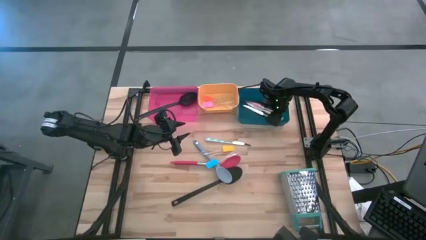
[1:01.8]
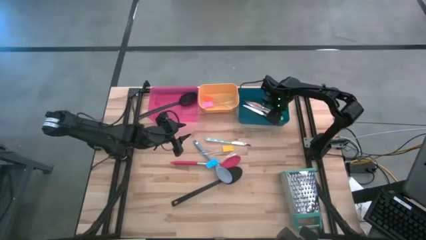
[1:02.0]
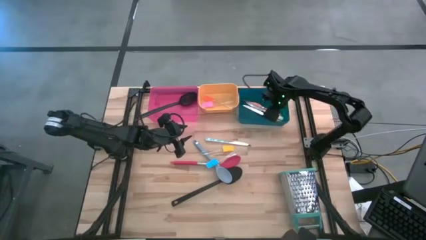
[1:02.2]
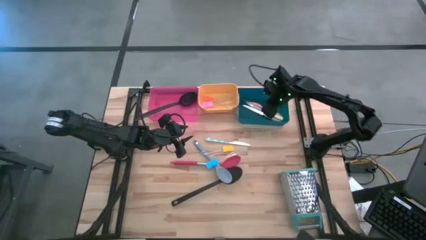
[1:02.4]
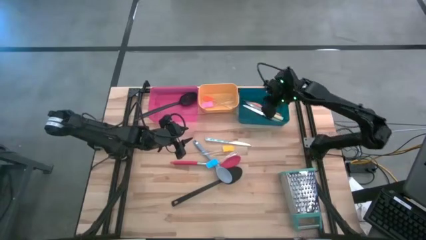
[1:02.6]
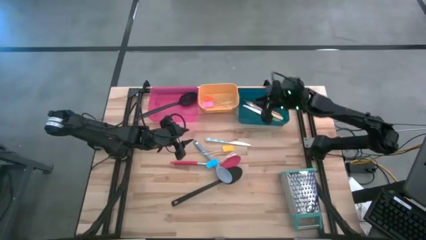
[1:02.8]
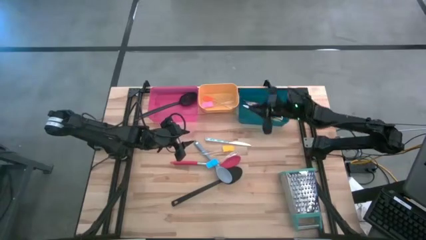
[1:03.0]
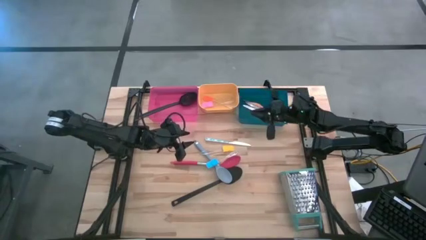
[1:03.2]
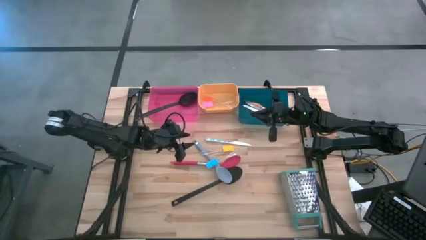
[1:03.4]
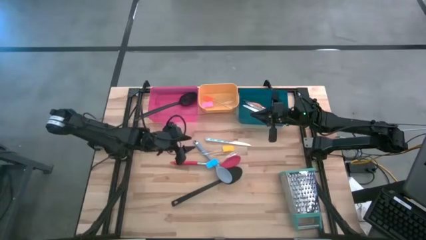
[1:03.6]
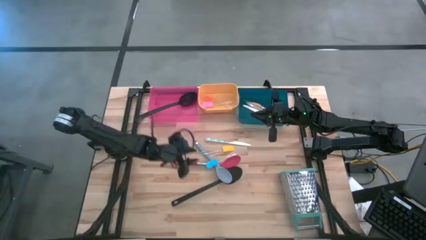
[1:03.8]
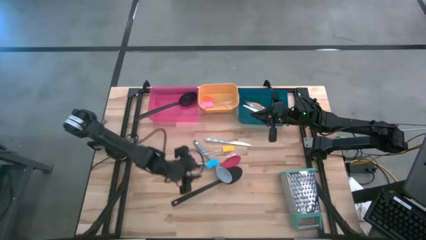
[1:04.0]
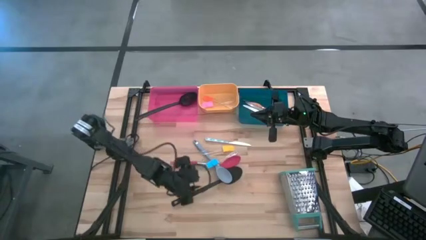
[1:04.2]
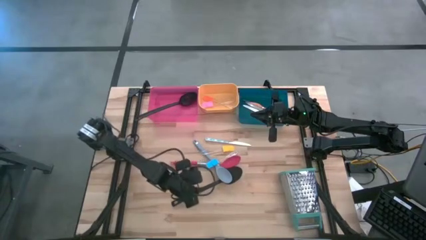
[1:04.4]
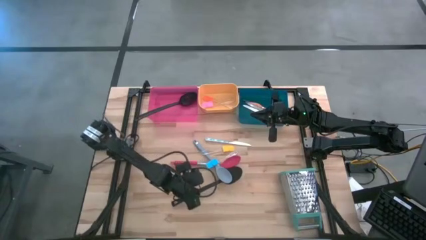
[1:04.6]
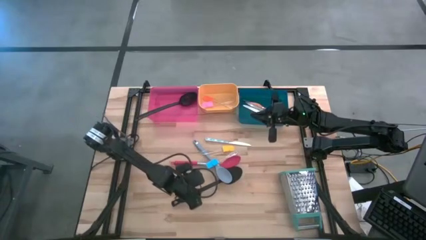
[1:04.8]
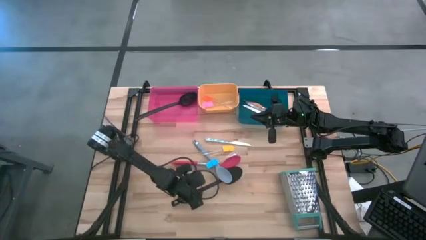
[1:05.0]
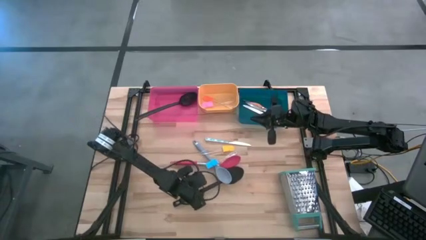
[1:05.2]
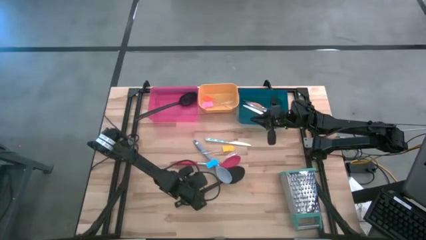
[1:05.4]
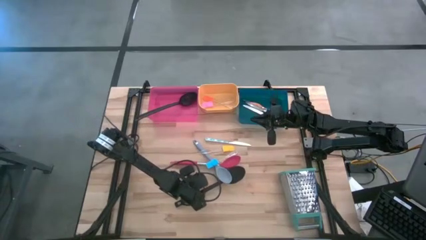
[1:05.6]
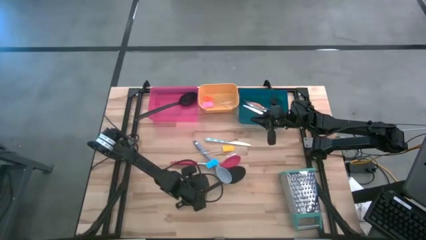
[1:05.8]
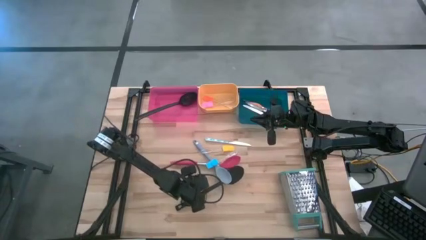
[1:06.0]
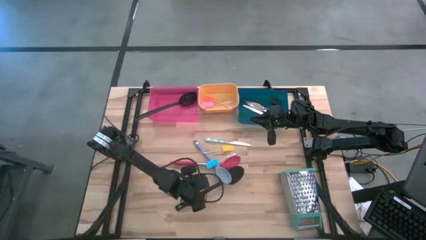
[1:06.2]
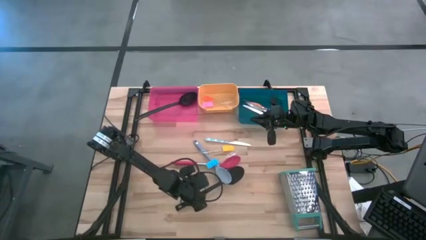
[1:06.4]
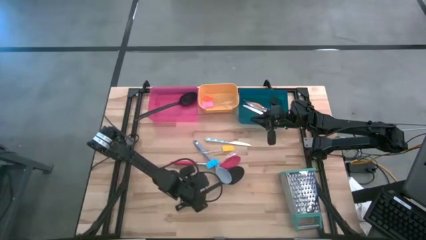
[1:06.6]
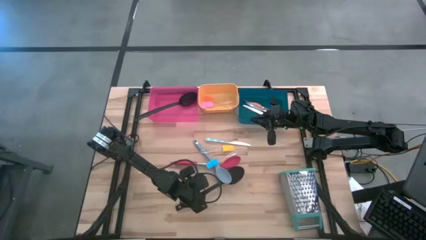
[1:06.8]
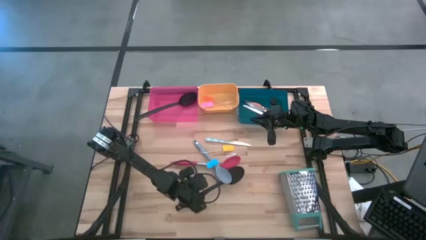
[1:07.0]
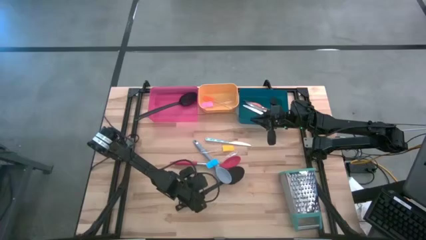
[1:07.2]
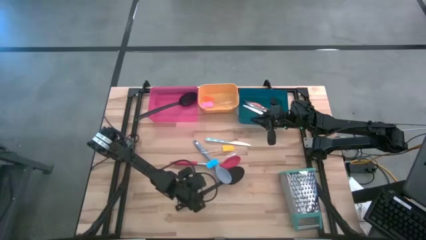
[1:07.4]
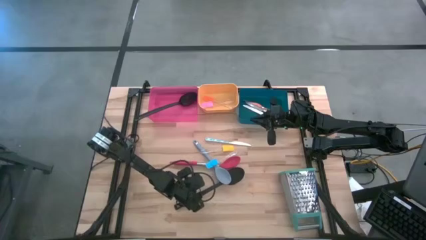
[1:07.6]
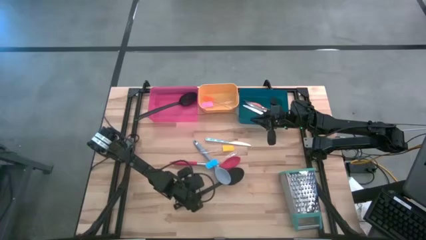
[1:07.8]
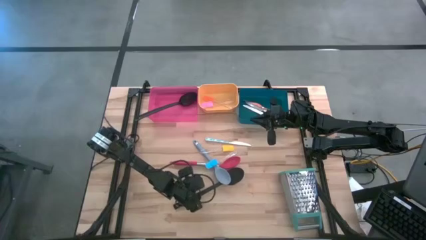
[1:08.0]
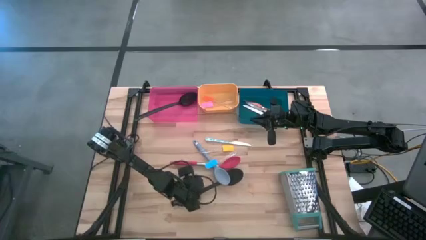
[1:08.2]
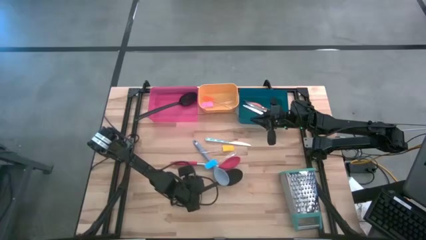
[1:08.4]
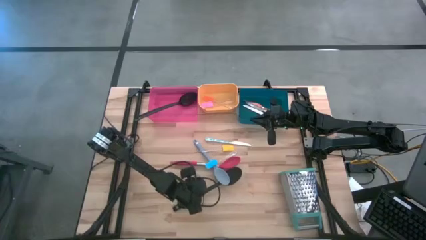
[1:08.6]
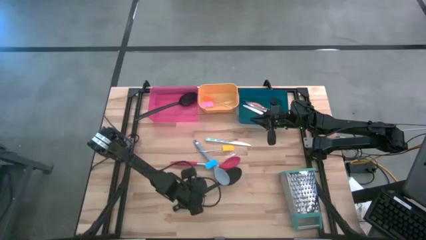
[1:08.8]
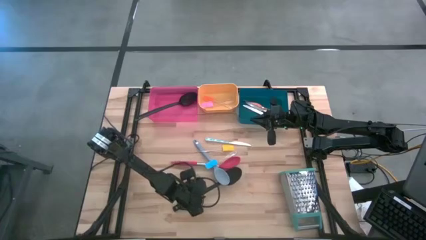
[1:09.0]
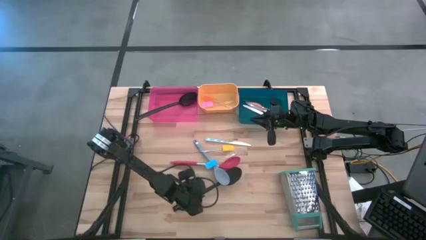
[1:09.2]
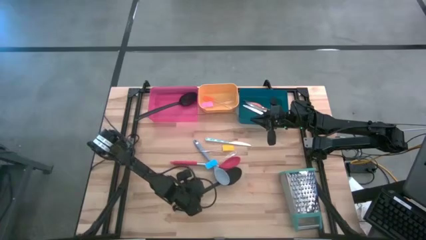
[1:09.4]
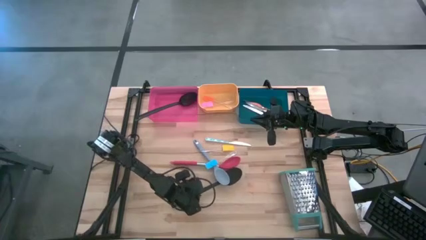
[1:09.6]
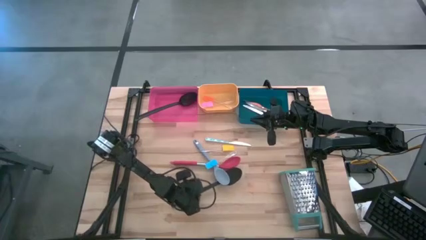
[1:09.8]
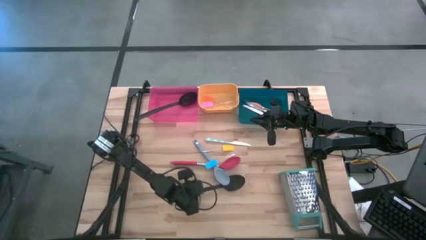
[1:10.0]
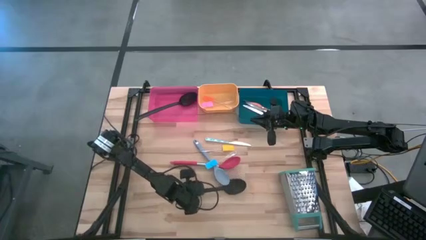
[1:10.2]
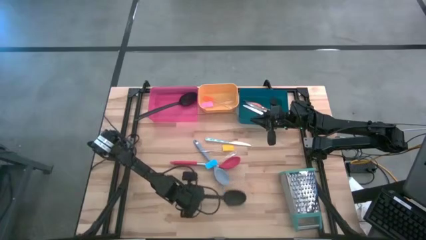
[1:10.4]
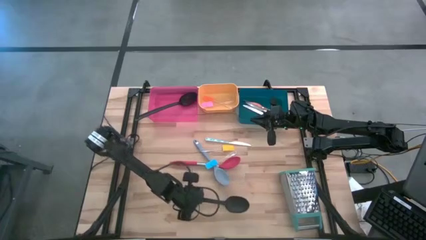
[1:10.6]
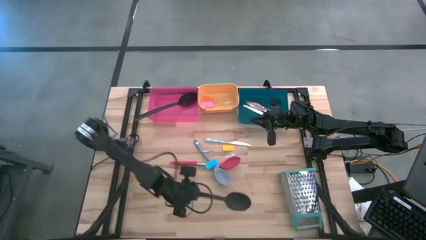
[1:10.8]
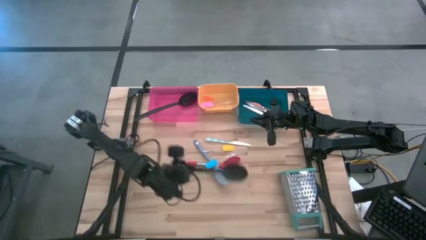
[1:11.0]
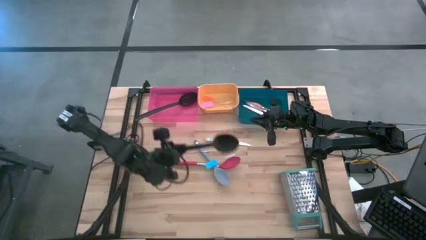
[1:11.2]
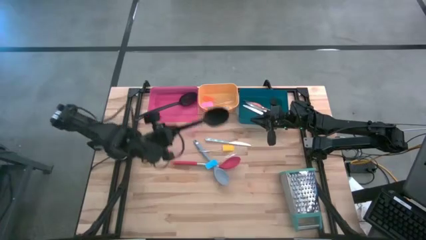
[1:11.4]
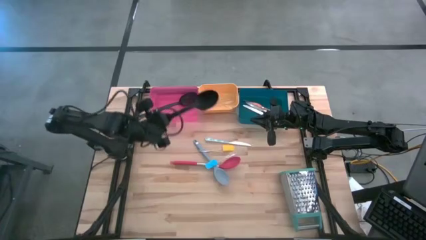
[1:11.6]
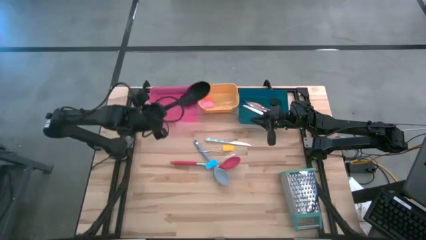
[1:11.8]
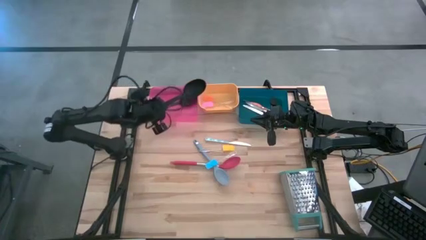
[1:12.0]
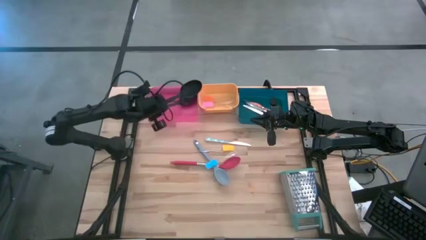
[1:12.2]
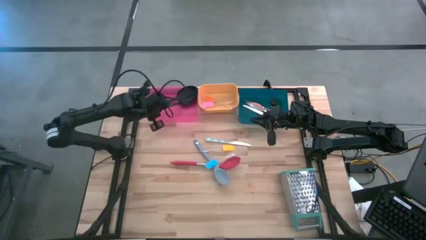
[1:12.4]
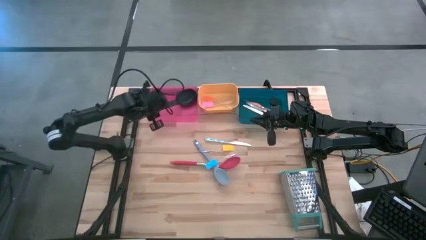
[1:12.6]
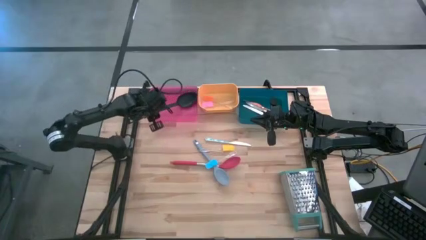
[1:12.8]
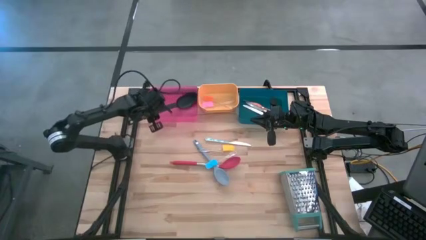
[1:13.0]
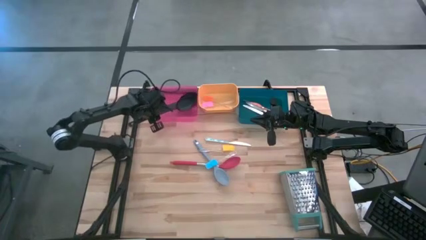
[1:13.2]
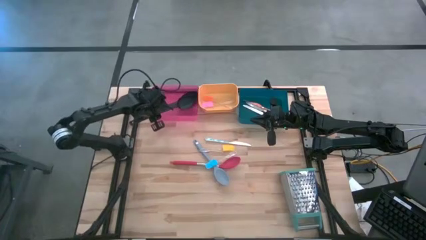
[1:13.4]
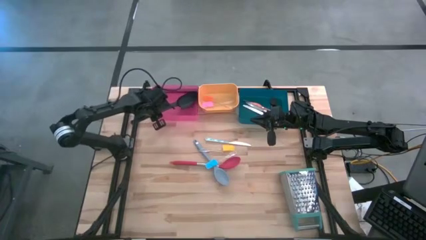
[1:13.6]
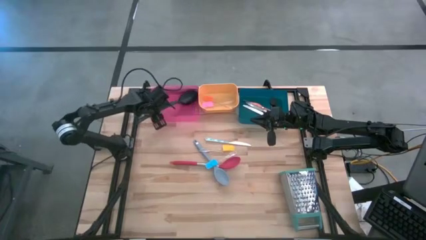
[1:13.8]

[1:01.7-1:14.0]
Task: Pick & Place Kitchen Items
Put the black spoon into the red bin

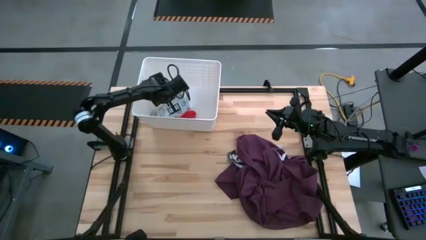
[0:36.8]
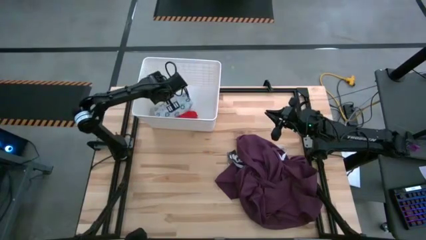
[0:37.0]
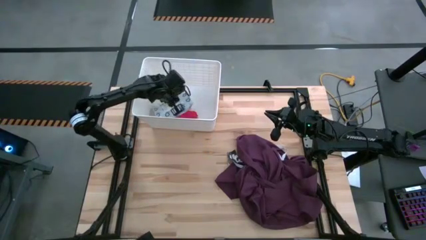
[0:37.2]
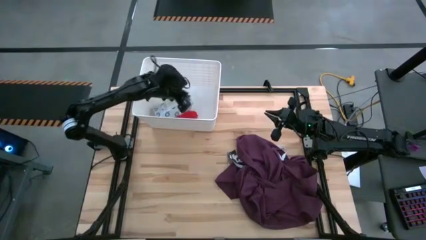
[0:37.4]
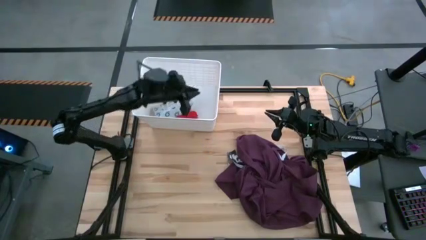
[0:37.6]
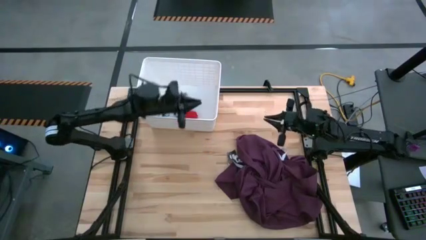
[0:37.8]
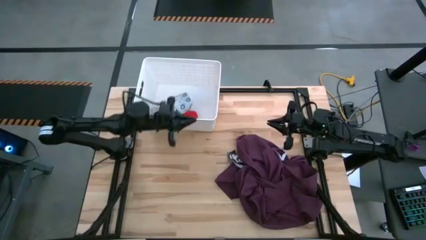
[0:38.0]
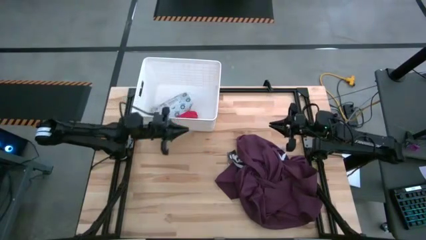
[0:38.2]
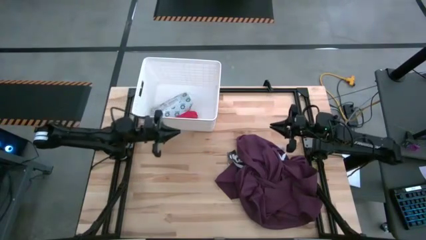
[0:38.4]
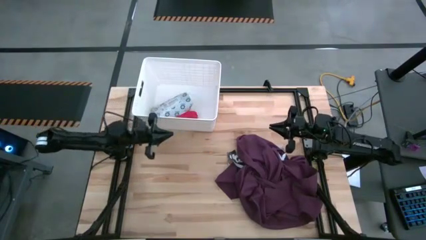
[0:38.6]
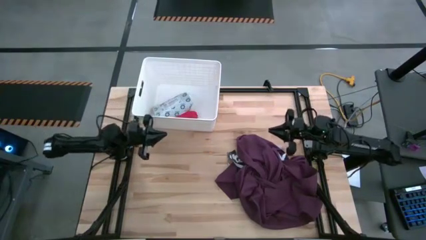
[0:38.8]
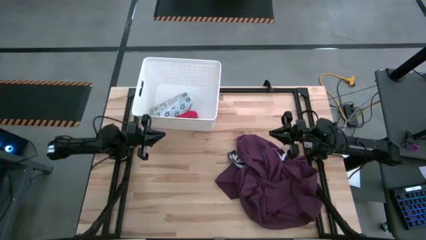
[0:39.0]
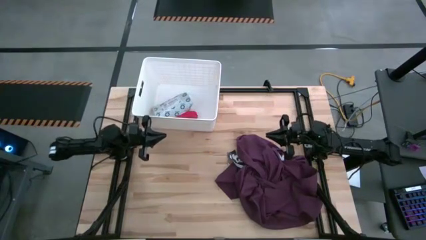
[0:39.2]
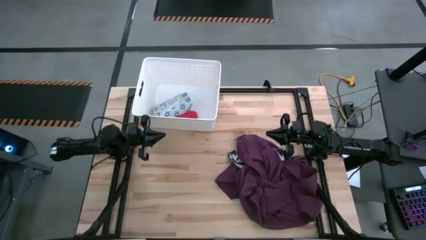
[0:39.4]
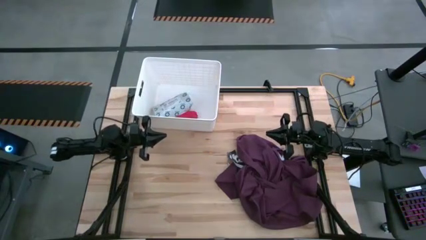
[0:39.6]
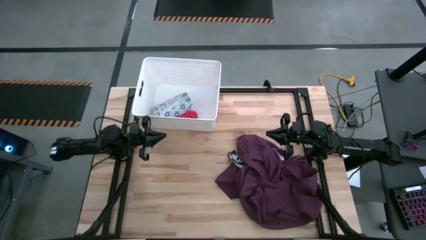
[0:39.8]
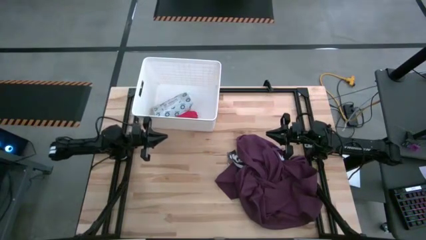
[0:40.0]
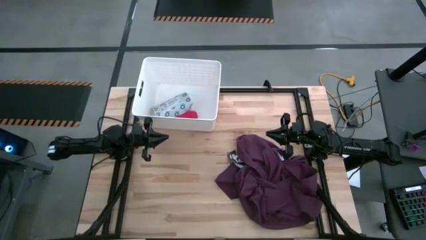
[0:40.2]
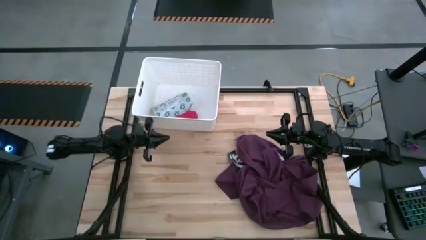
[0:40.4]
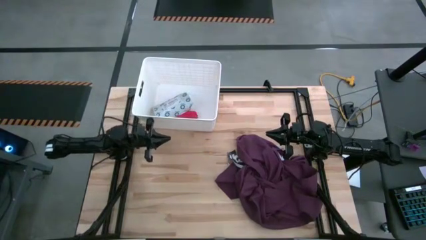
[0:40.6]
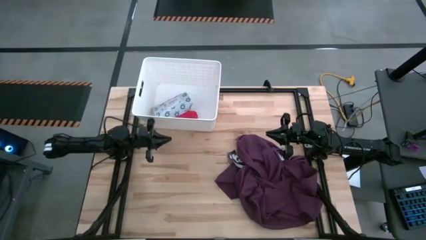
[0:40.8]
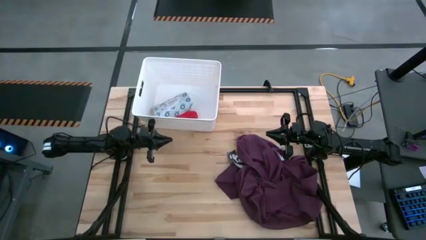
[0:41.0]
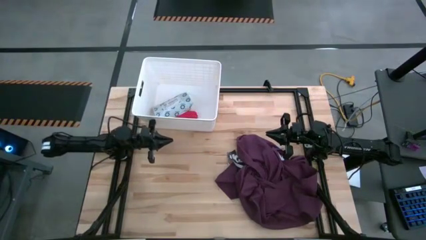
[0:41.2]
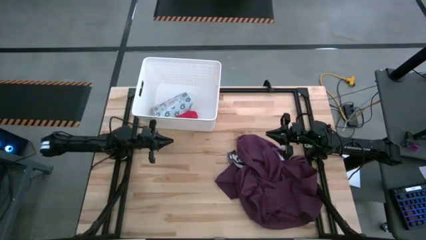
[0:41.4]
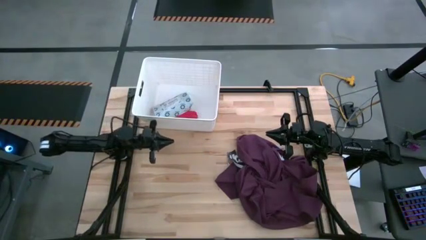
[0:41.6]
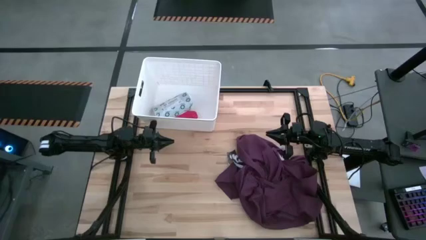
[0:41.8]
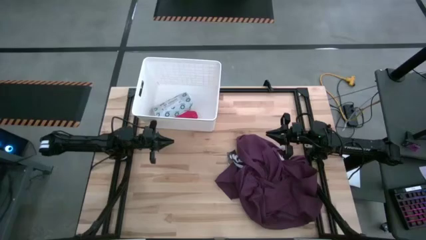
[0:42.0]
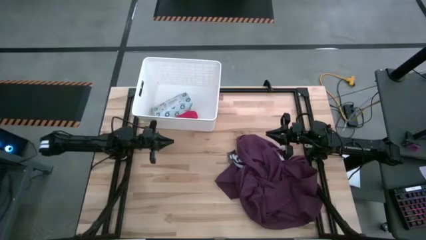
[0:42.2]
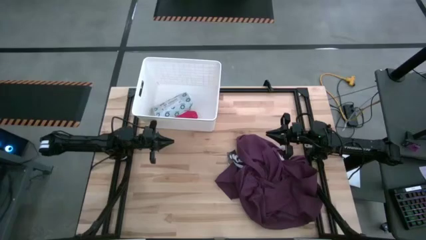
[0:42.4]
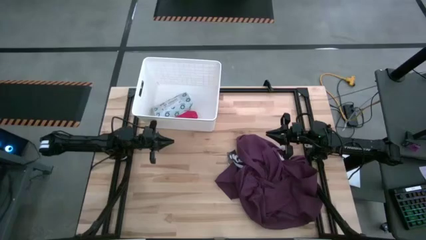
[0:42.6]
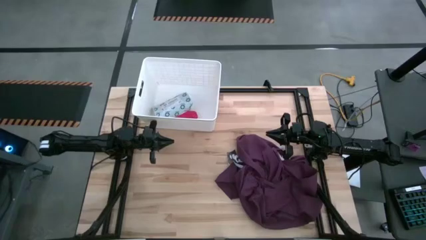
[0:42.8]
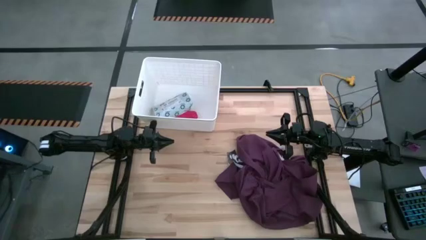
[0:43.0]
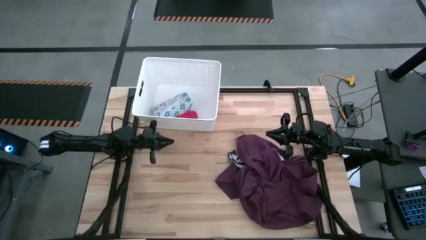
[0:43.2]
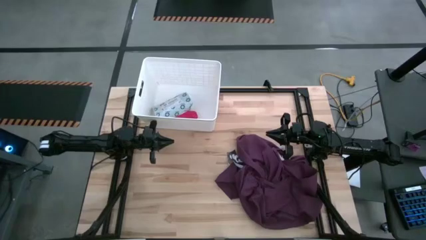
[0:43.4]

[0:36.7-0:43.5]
Task: Pick & place medical supplies in basket/bin
Return to Home Position
